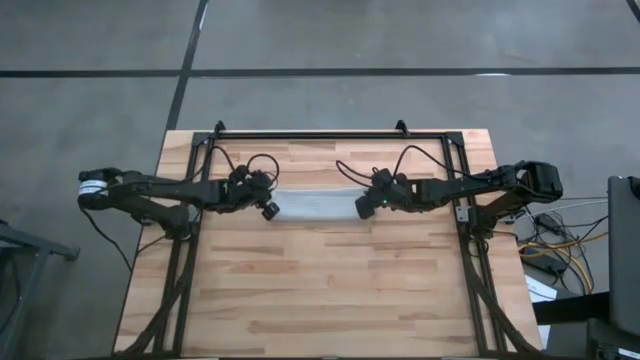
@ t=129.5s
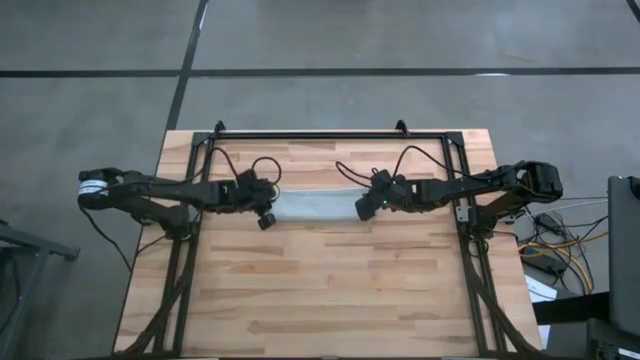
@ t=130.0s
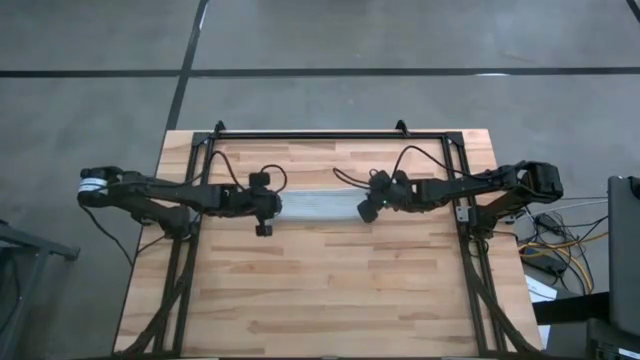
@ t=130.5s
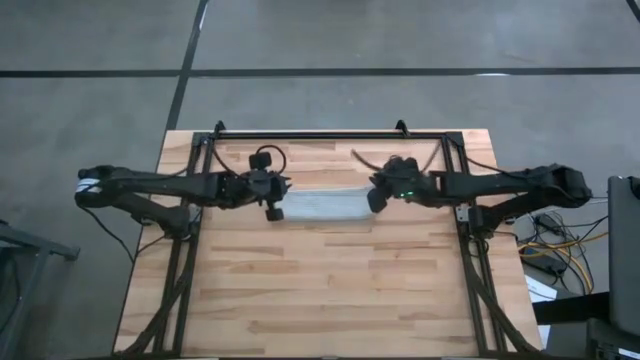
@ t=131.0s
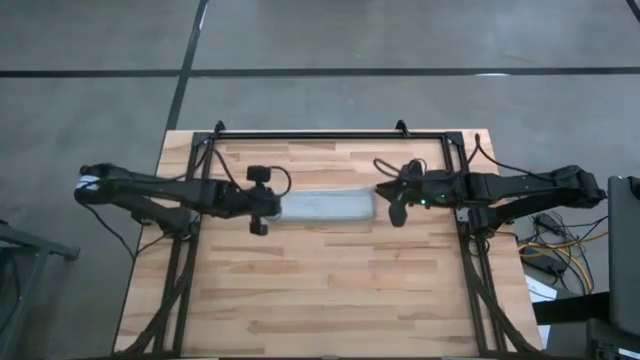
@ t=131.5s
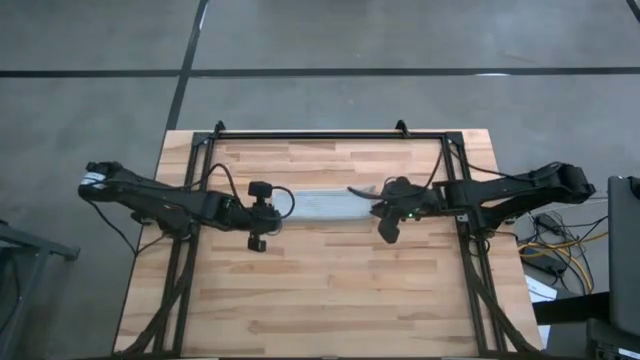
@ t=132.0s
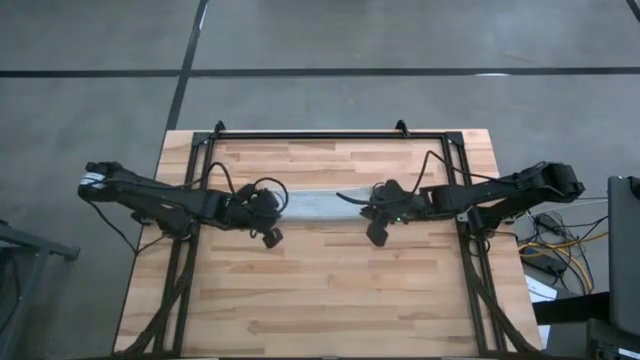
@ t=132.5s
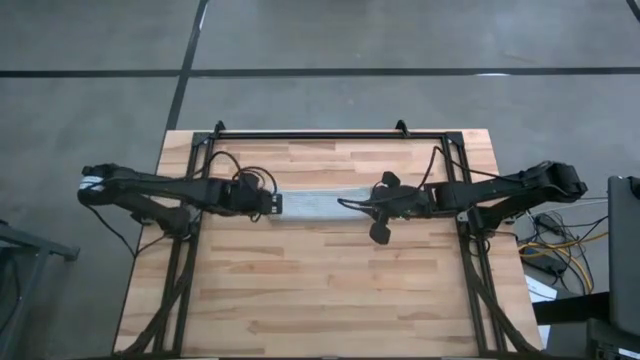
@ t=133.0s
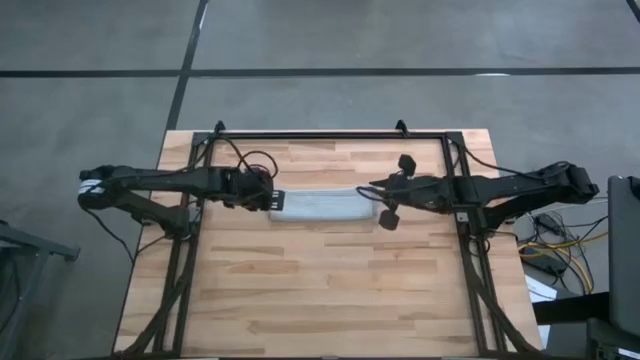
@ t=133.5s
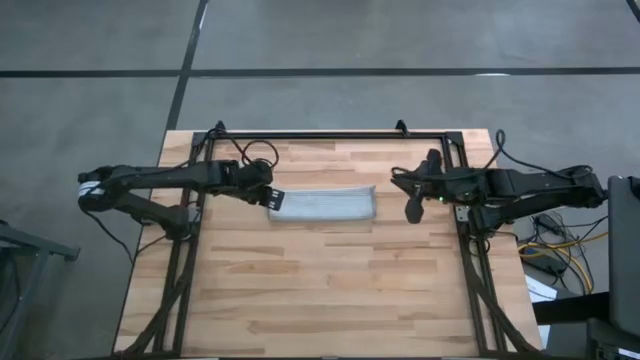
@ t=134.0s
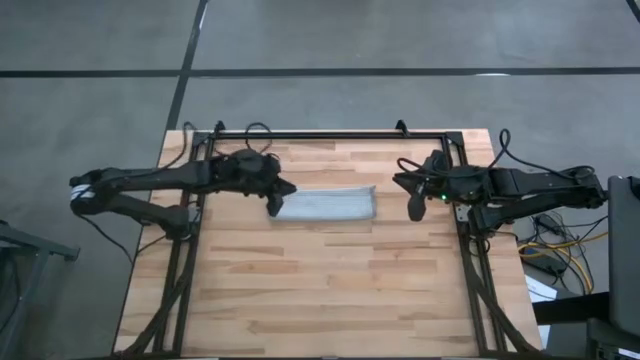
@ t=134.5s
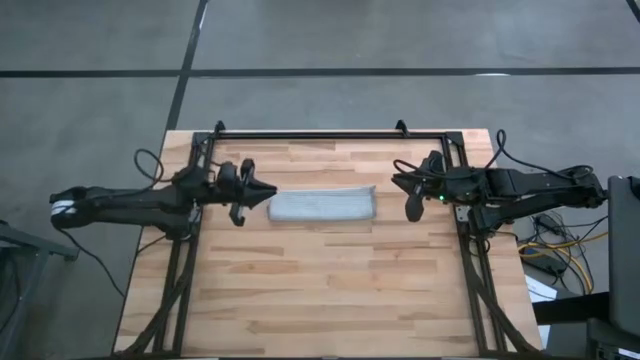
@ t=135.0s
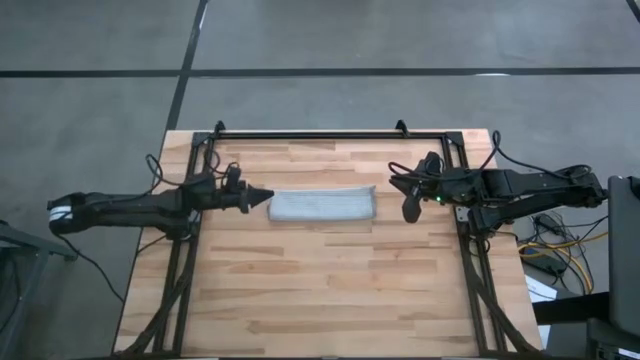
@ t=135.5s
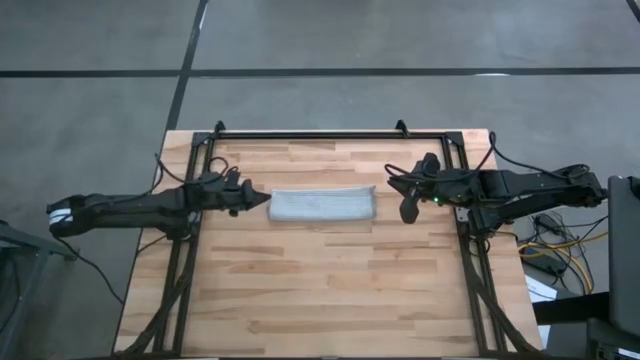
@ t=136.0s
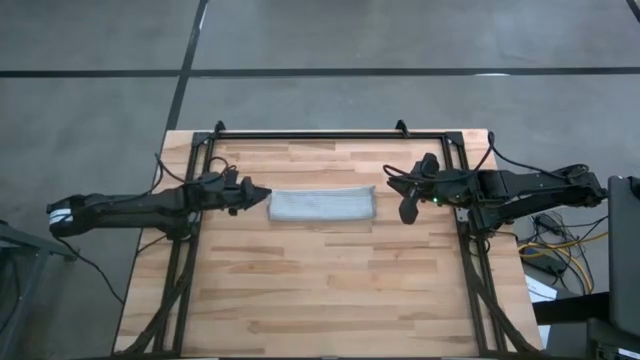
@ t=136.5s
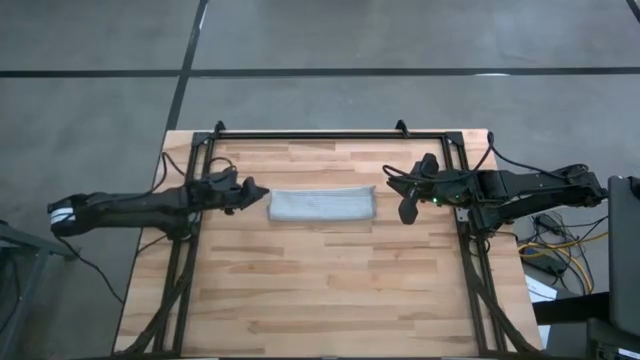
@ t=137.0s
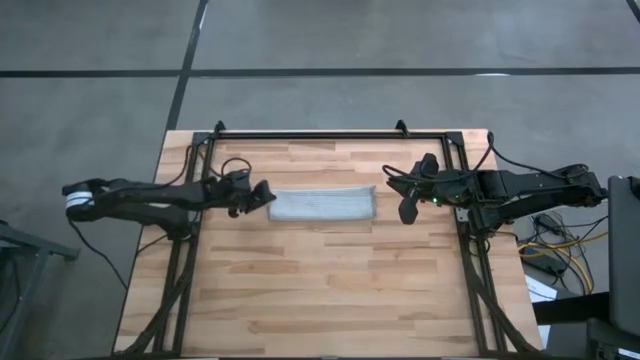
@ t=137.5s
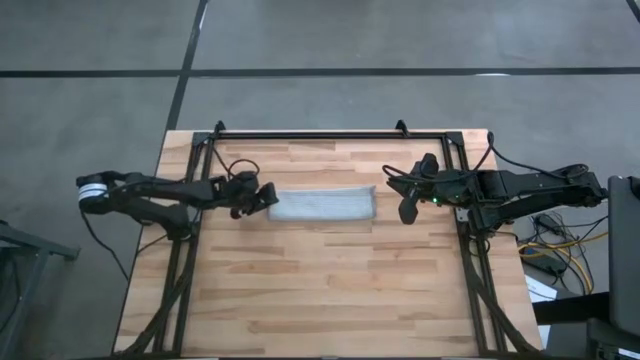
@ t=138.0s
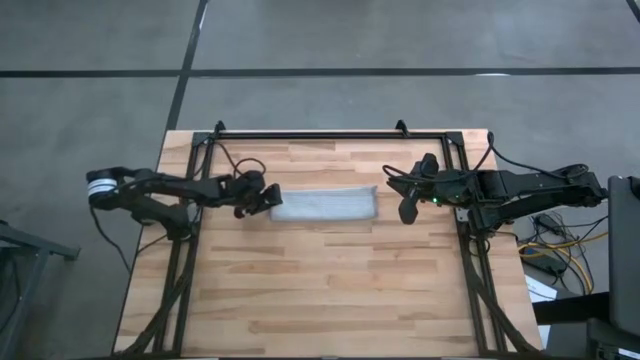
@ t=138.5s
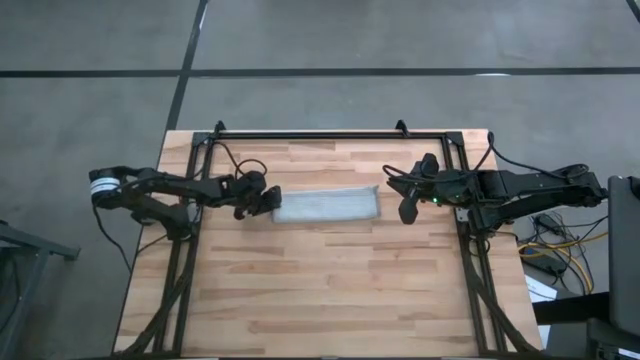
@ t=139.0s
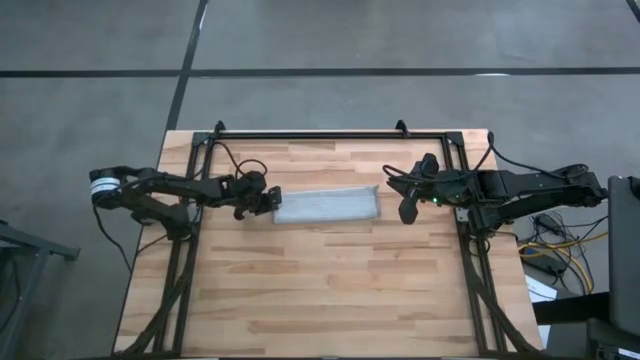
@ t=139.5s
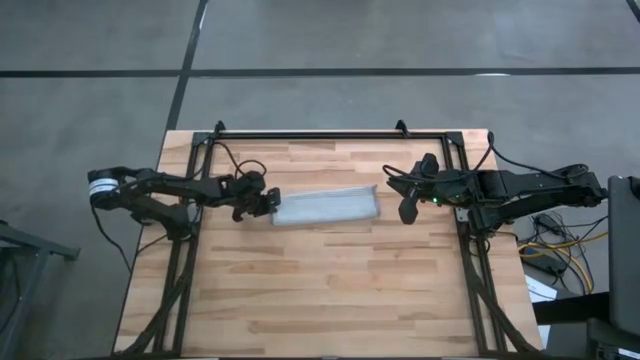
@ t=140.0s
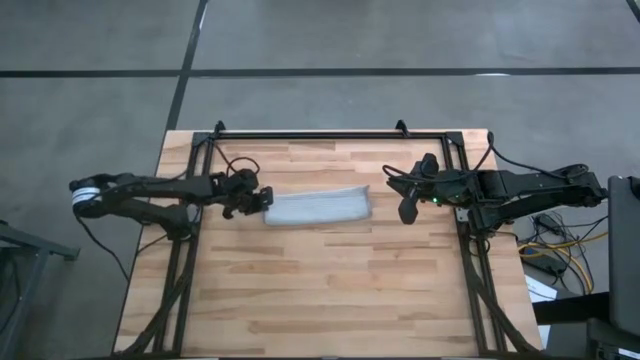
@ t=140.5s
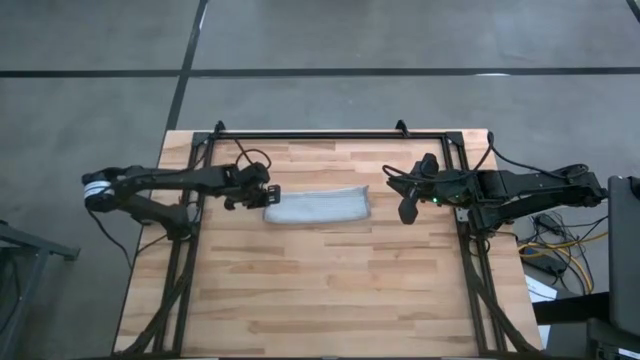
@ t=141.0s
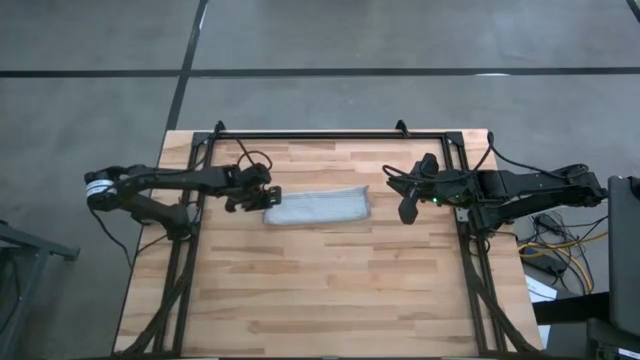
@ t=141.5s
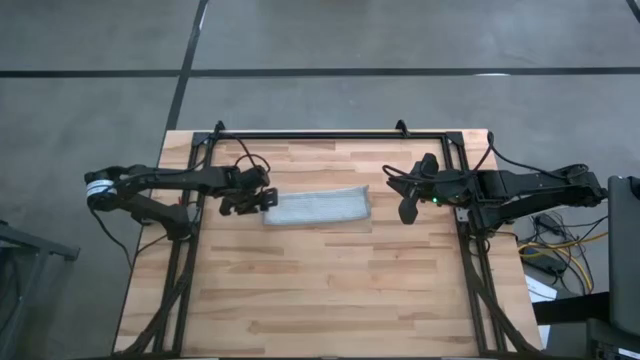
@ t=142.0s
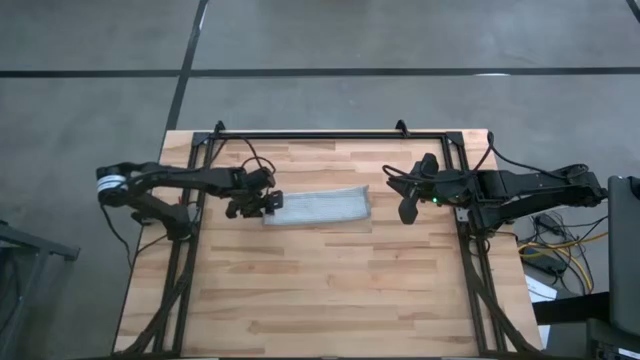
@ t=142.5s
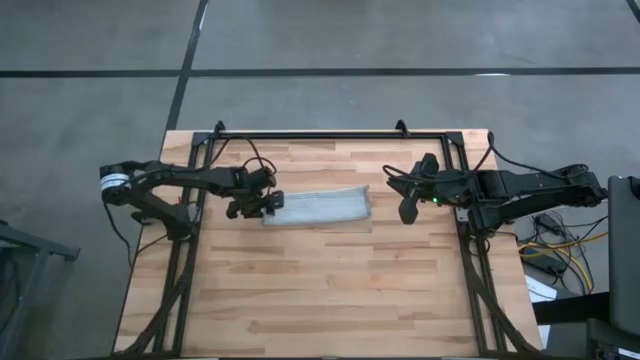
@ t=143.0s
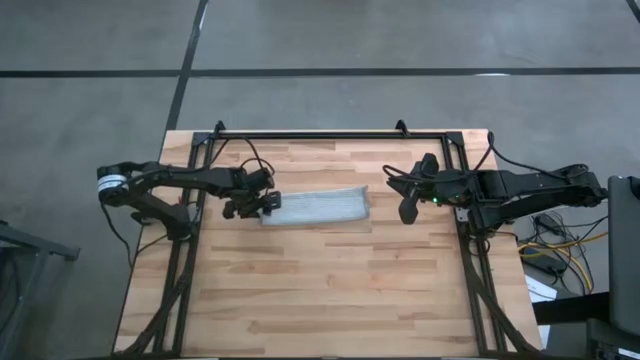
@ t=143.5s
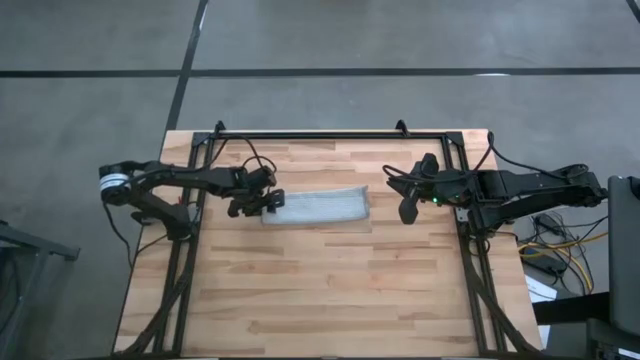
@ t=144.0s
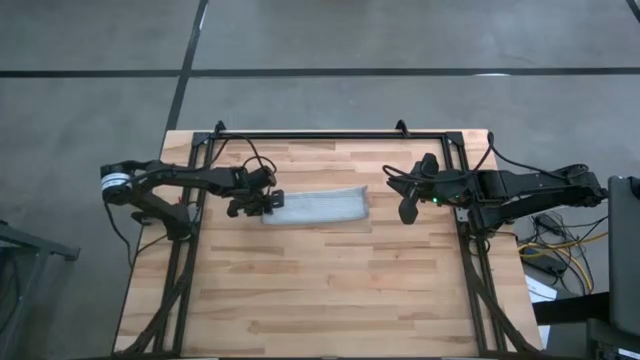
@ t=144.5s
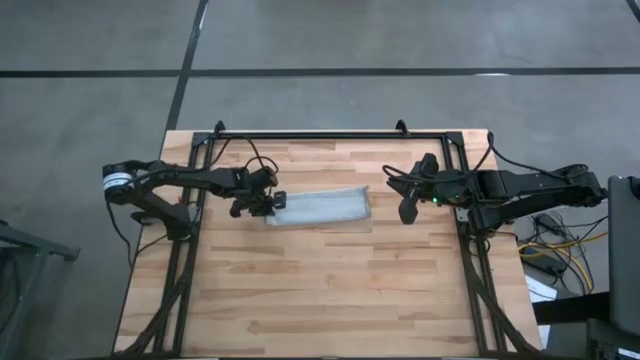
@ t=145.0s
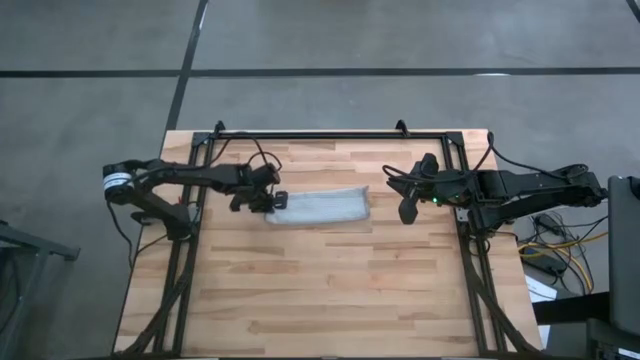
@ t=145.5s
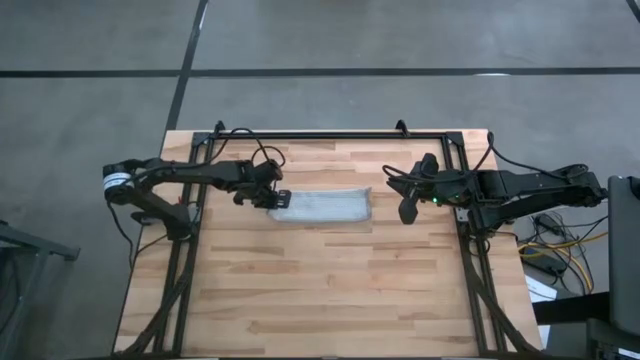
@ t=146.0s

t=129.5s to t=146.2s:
Task: Roll towel
Roll the gray towel

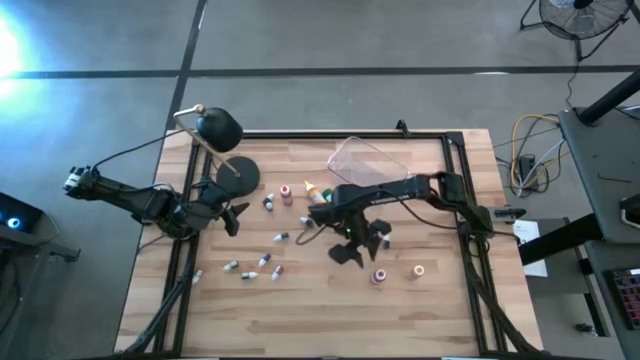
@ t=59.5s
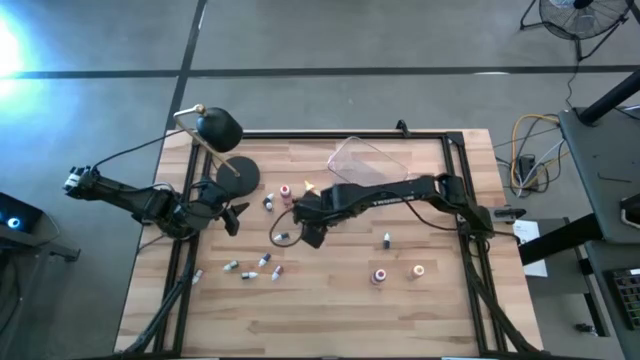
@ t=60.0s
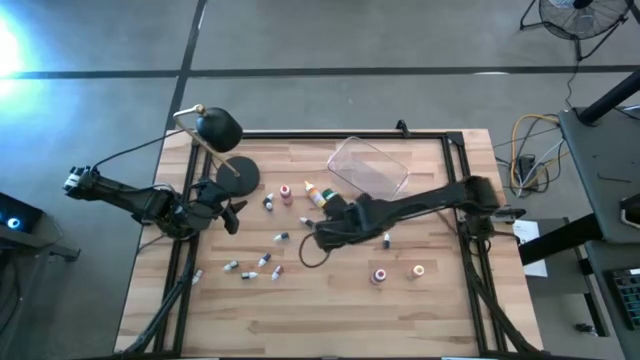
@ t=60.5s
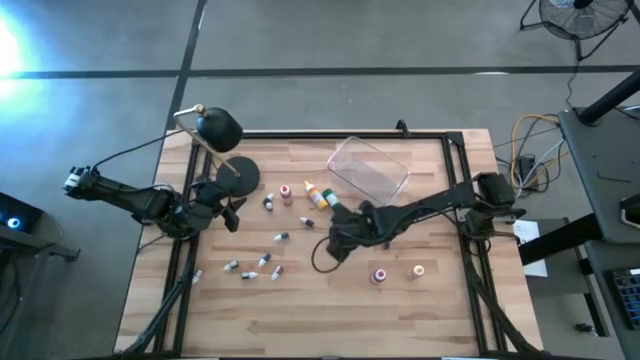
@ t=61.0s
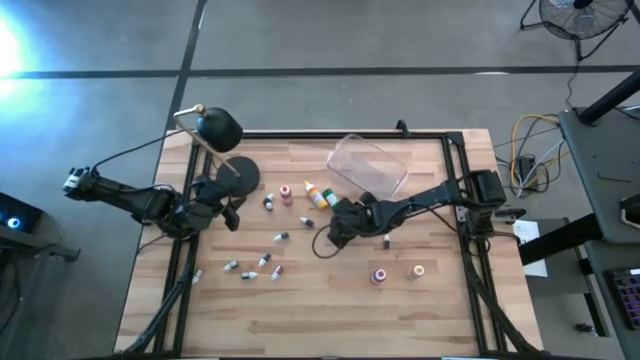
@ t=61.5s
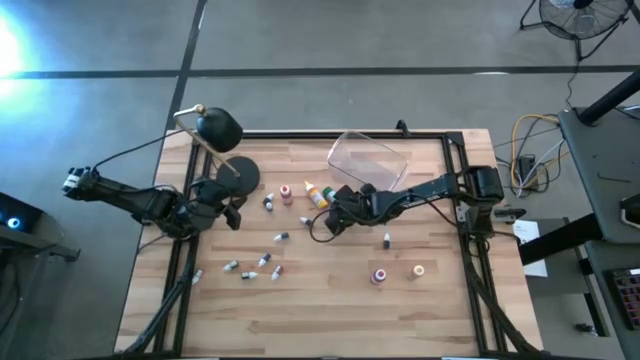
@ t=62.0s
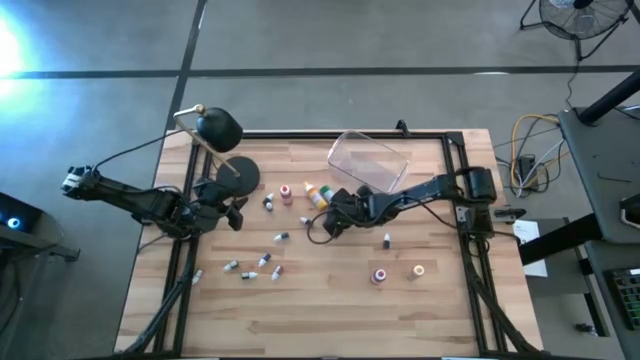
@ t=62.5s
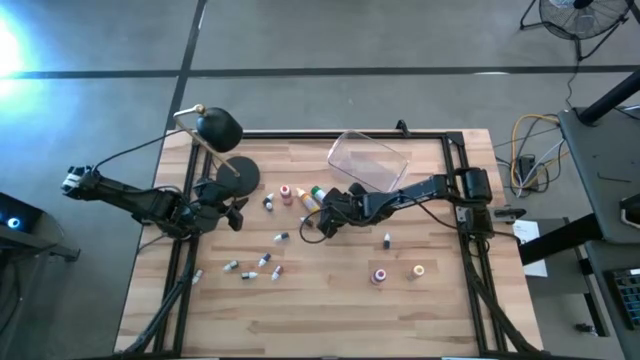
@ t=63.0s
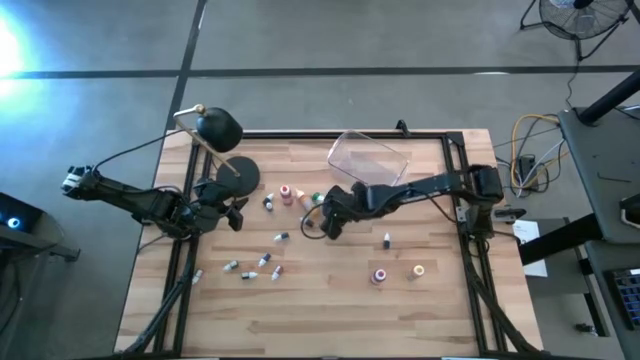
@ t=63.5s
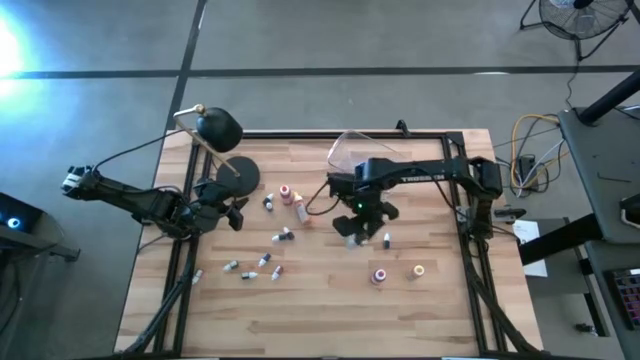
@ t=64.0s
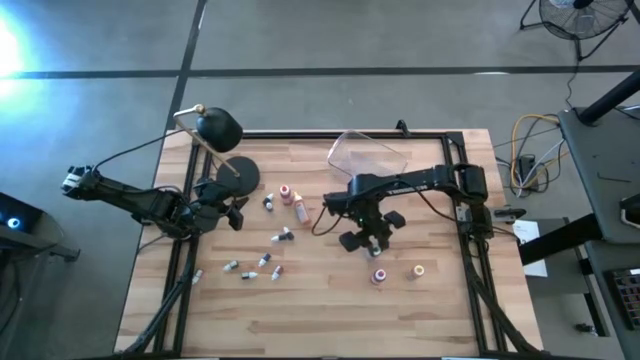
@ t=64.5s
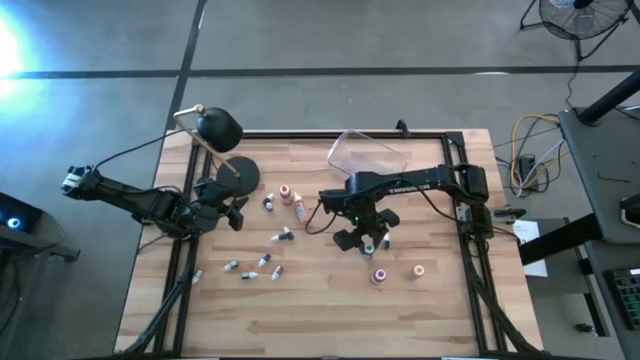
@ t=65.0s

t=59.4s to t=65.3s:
Task: Pick & Place food coloring
Adjust the large green food coloring bottle
